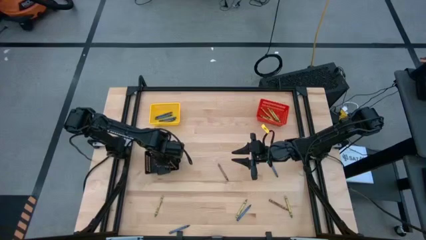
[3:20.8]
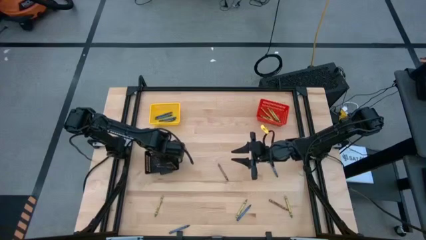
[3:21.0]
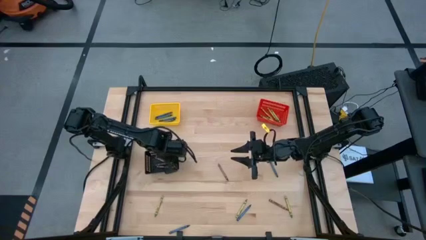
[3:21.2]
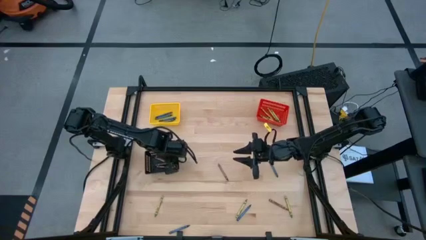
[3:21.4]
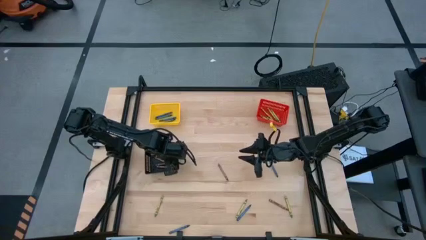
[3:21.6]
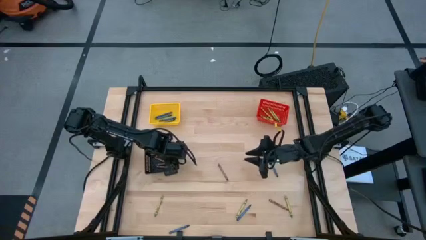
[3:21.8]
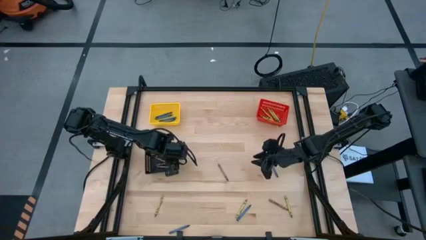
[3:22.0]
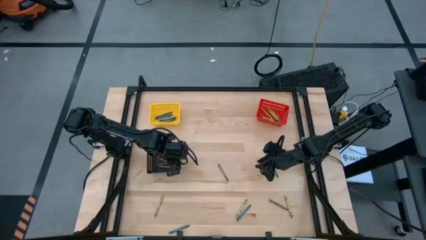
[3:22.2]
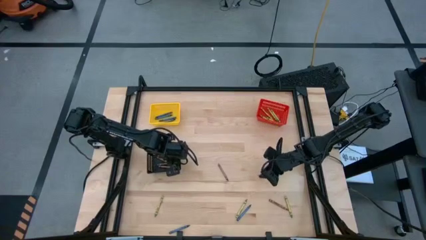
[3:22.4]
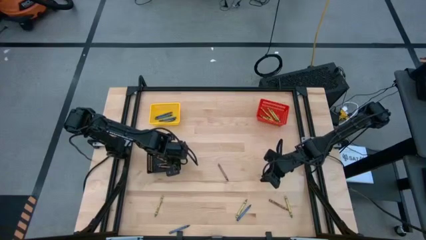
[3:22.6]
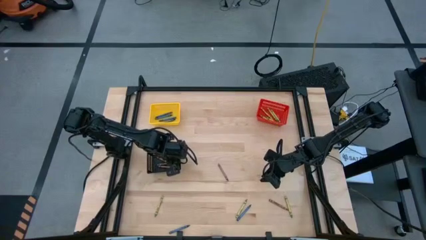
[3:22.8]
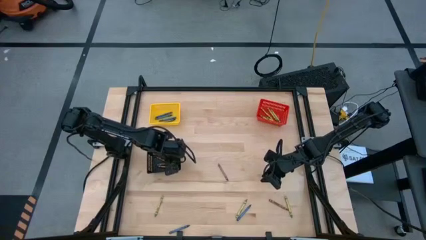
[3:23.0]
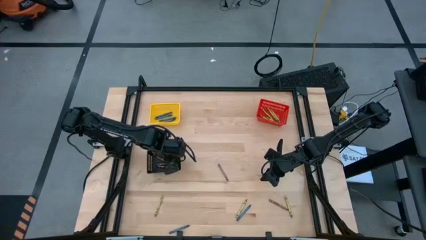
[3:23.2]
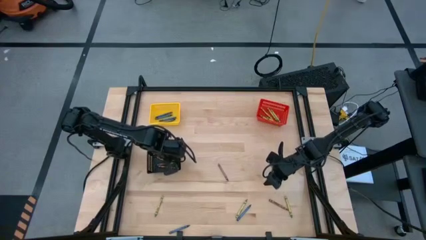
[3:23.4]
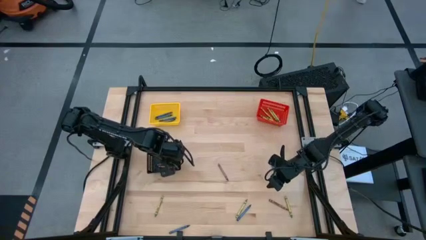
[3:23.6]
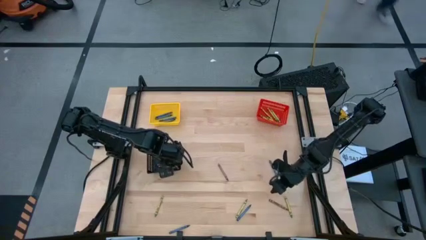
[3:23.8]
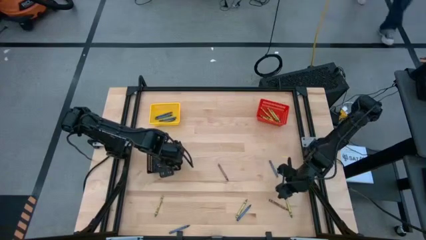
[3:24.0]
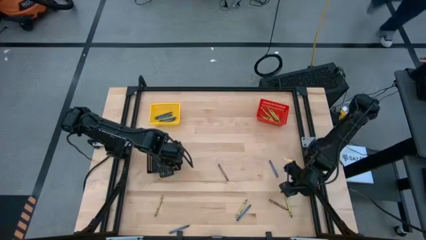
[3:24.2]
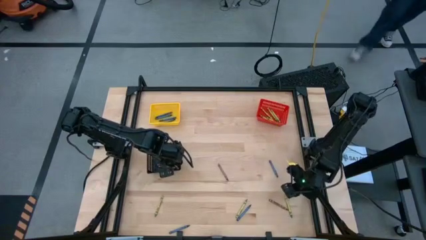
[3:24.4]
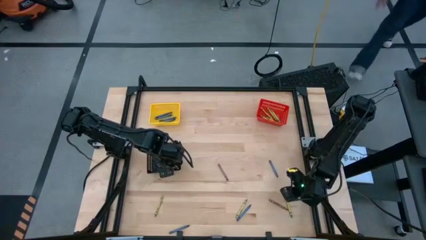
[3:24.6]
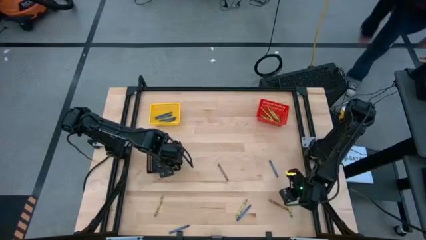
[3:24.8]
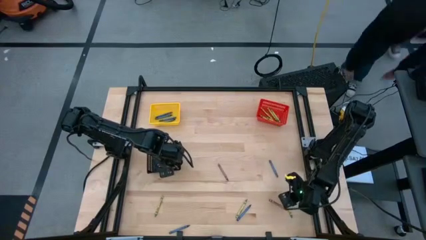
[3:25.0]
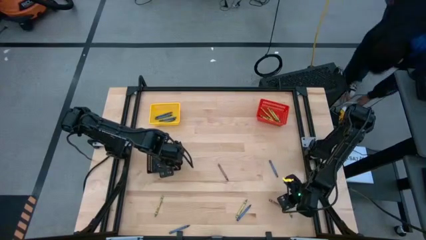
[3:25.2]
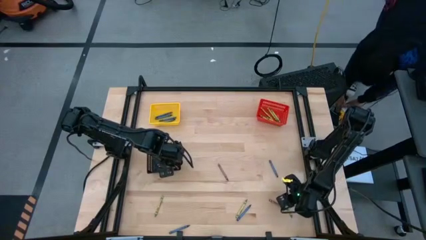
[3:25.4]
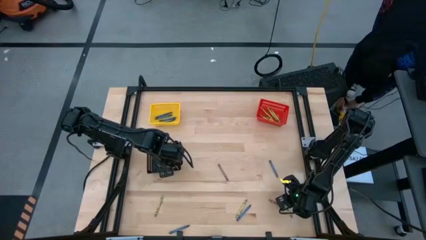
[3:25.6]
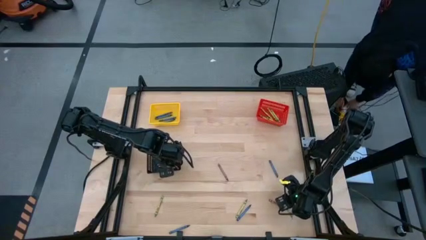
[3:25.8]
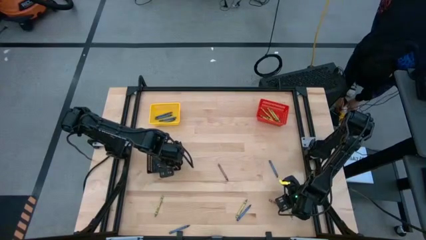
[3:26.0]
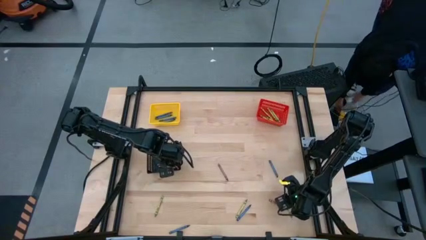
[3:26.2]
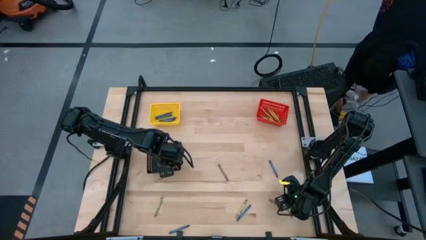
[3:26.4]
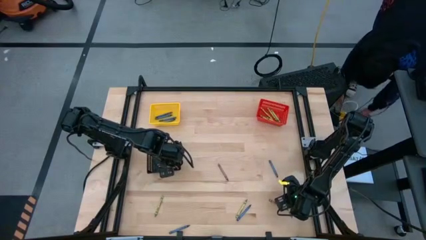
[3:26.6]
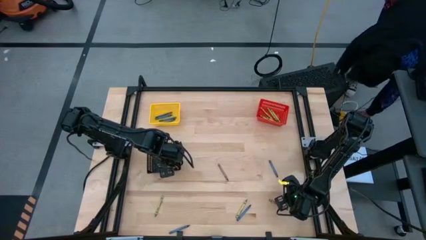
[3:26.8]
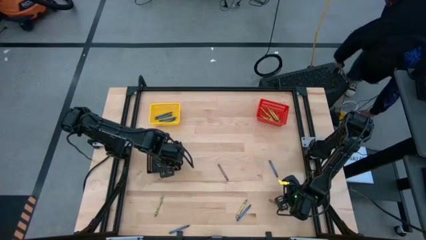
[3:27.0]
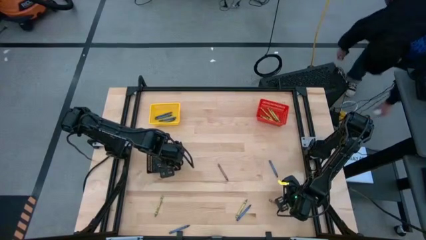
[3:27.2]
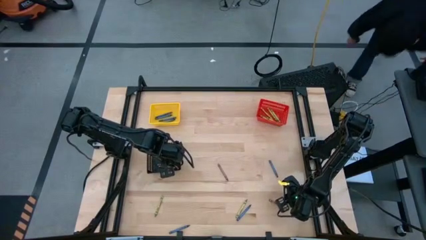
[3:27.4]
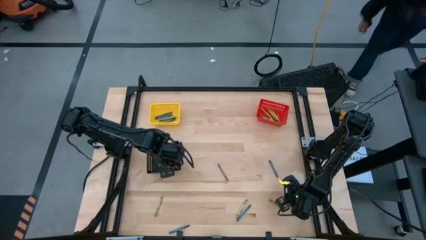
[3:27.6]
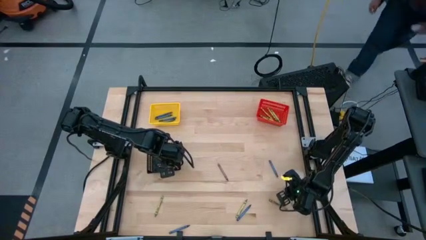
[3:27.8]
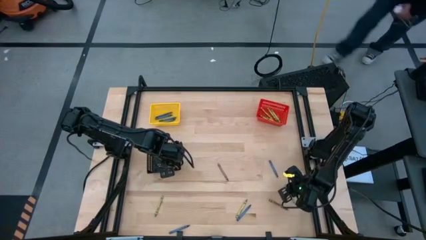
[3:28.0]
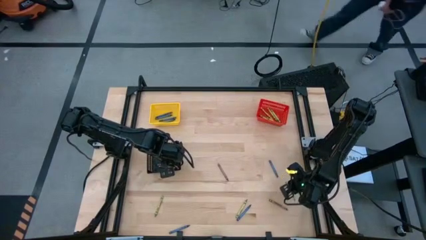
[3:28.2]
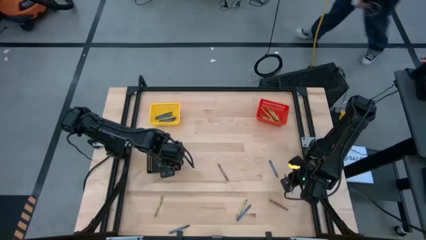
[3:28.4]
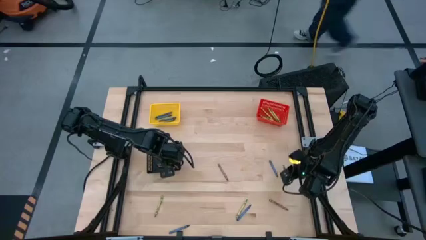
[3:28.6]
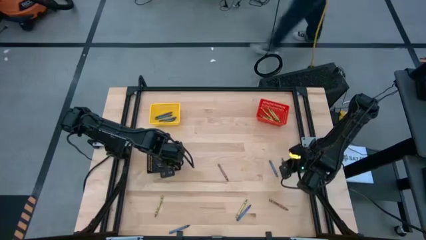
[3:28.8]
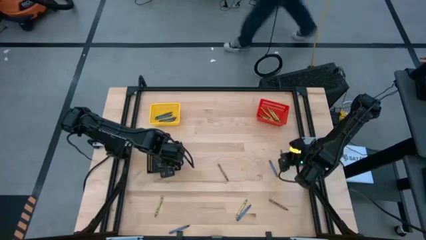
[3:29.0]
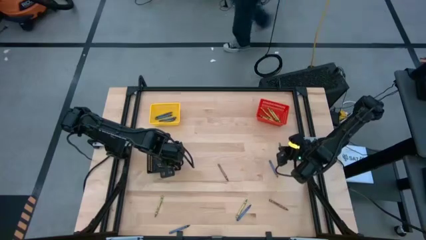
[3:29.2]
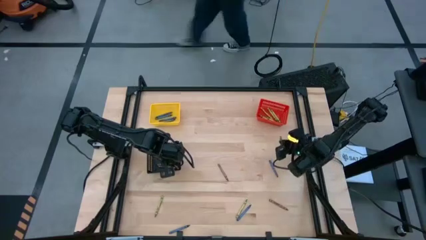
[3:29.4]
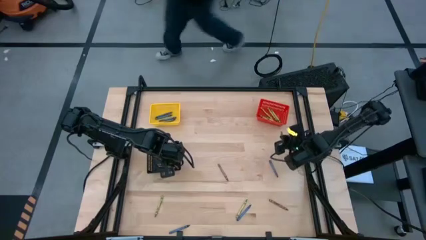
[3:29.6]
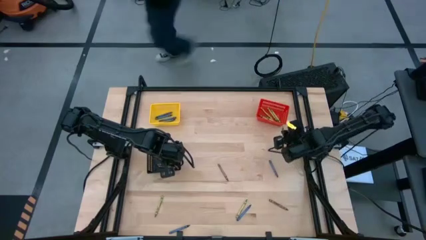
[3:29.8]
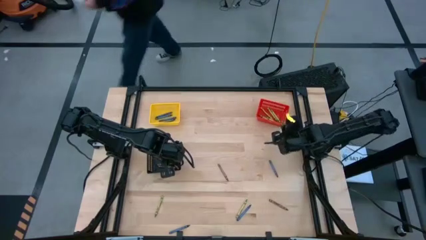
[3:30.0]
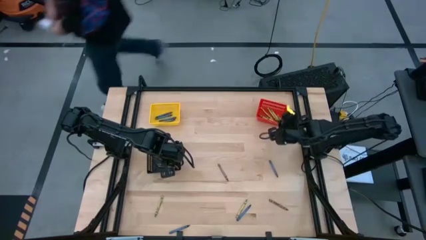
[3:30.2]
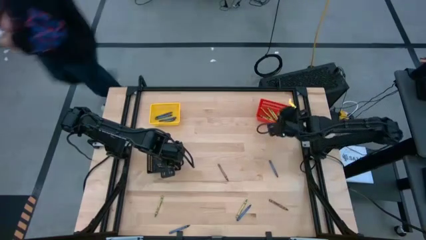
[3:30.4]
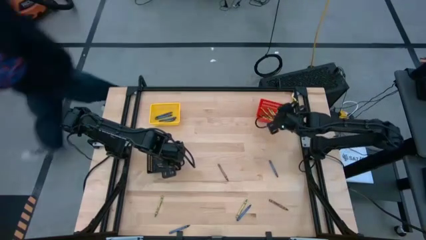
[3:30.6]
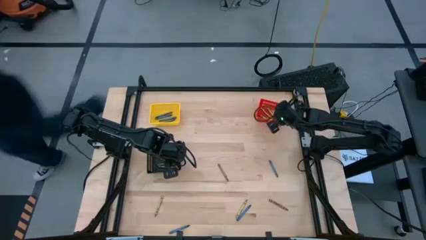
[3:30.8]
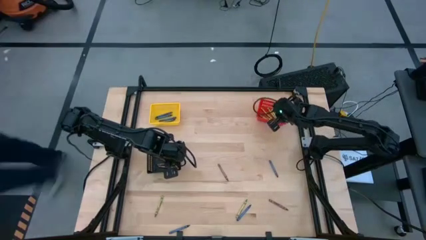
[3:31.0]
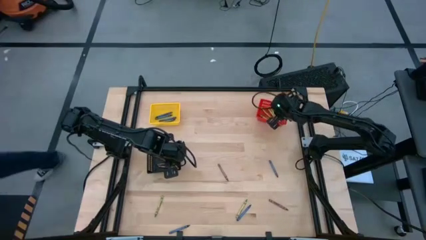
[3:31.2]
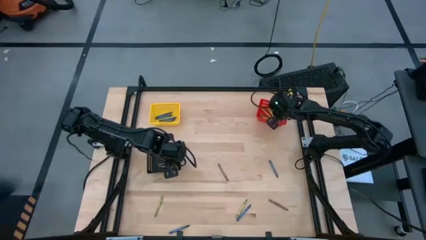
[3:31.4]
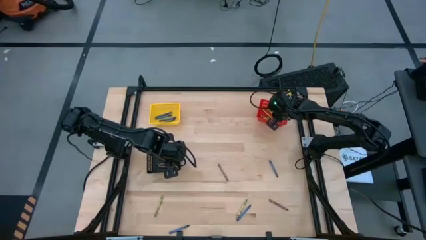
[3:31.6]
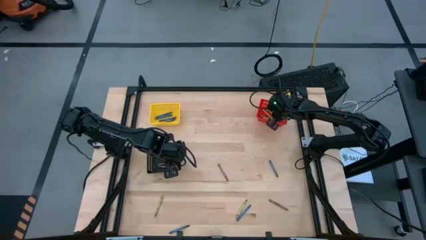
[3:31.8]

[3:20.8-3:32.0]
Task: Sort crayons
Put the green crayon into the red bin

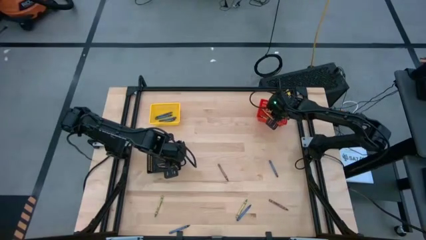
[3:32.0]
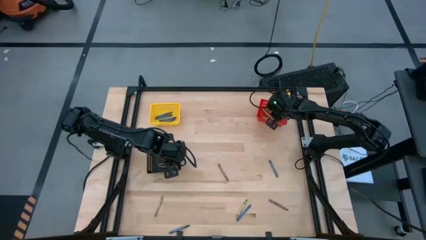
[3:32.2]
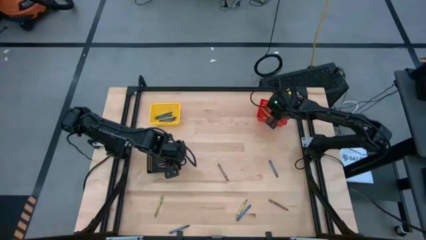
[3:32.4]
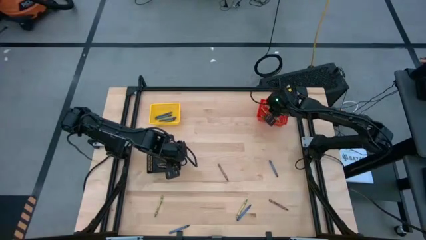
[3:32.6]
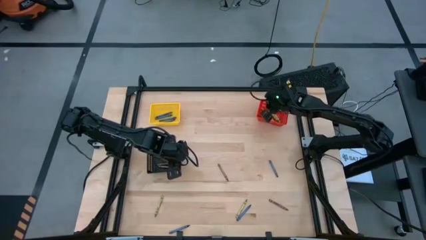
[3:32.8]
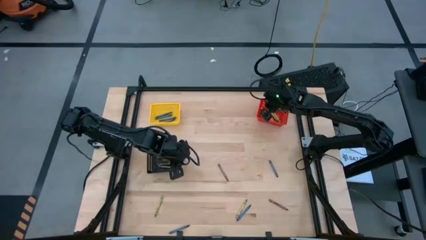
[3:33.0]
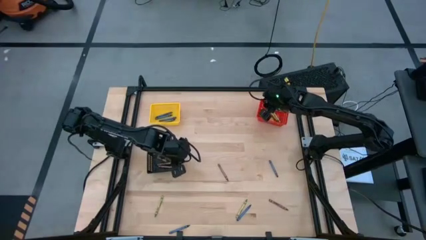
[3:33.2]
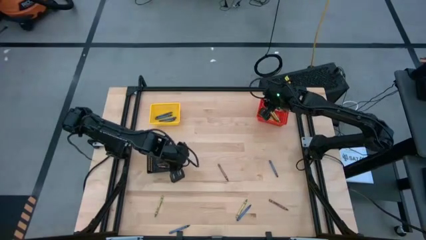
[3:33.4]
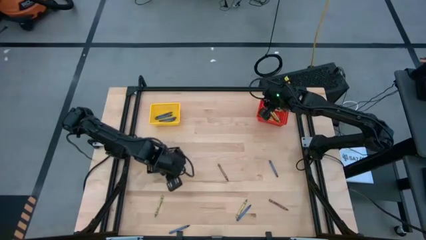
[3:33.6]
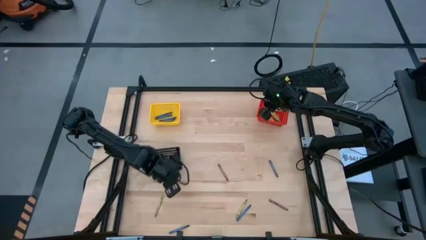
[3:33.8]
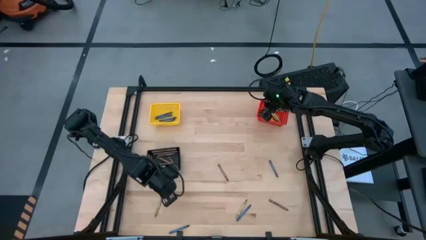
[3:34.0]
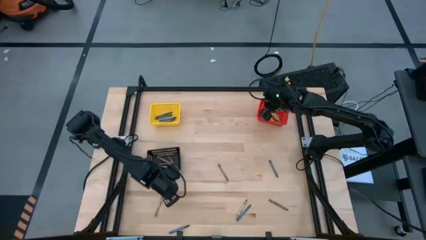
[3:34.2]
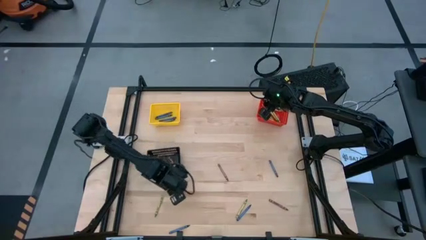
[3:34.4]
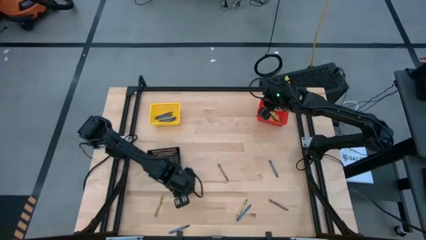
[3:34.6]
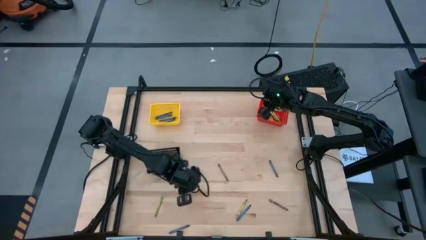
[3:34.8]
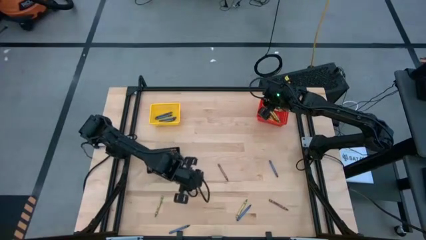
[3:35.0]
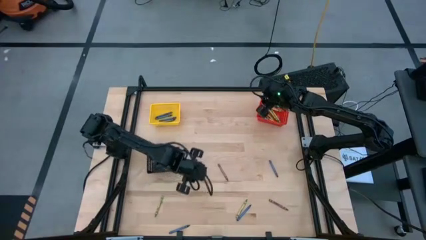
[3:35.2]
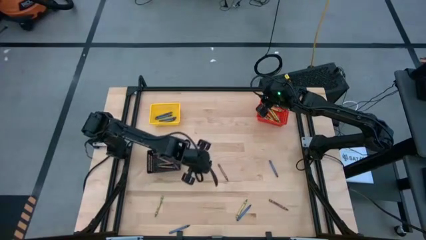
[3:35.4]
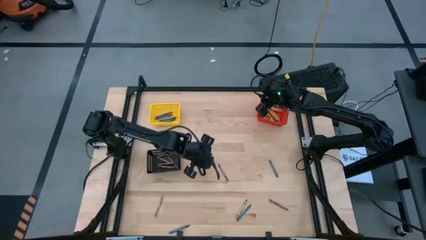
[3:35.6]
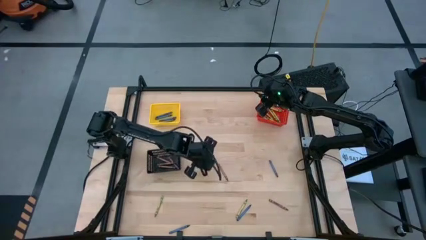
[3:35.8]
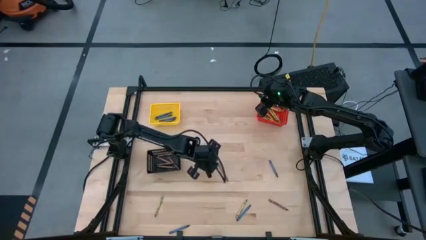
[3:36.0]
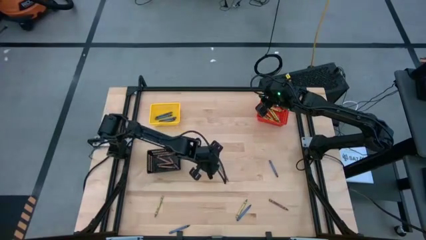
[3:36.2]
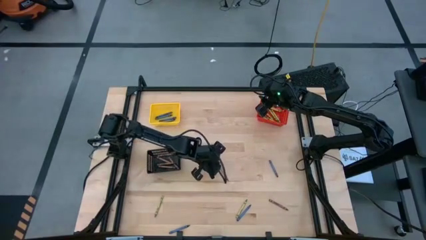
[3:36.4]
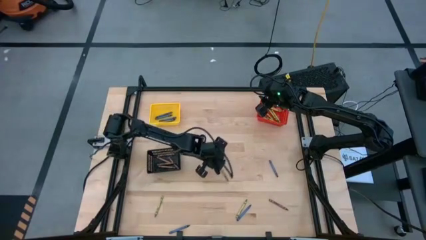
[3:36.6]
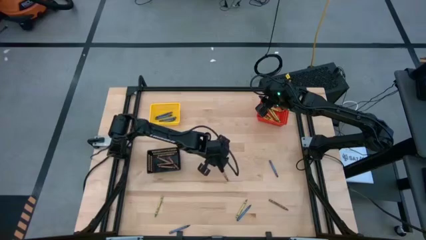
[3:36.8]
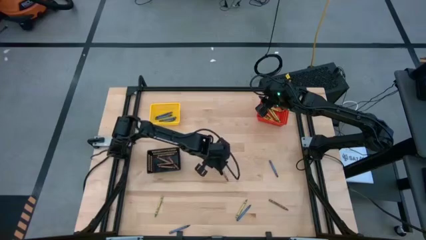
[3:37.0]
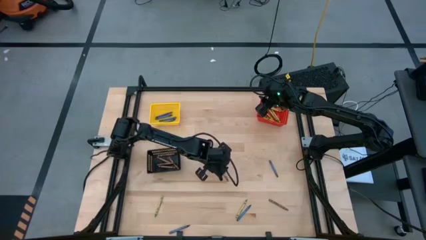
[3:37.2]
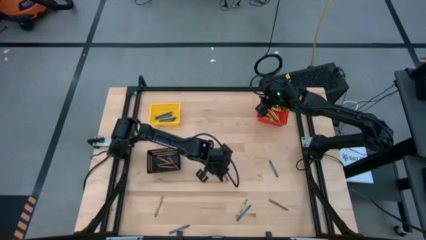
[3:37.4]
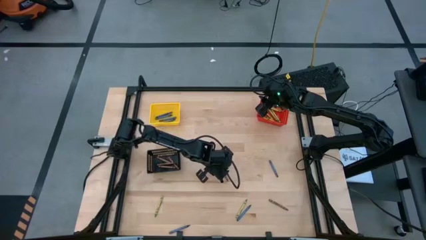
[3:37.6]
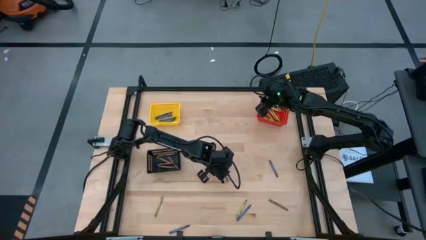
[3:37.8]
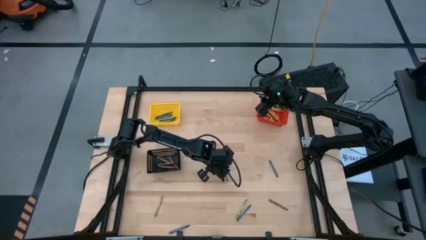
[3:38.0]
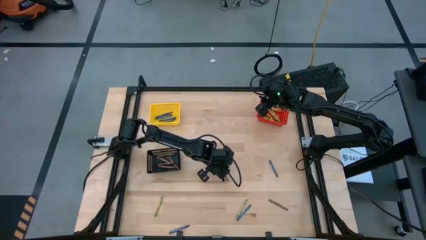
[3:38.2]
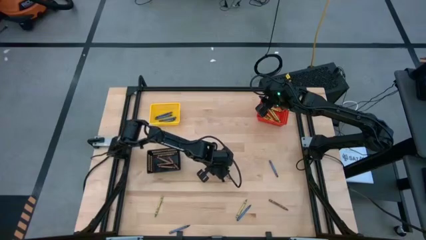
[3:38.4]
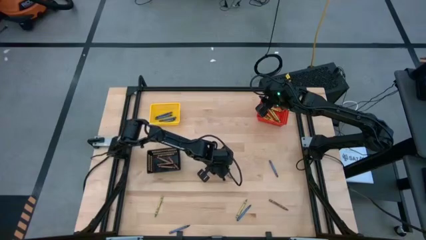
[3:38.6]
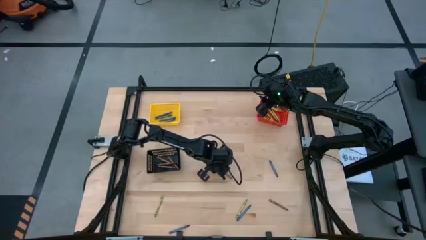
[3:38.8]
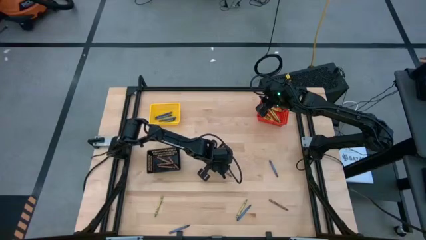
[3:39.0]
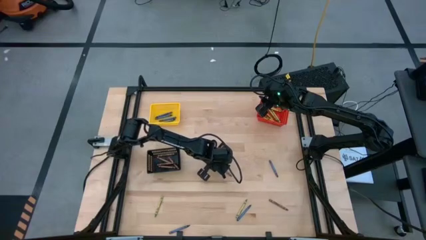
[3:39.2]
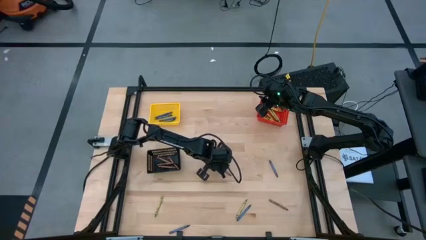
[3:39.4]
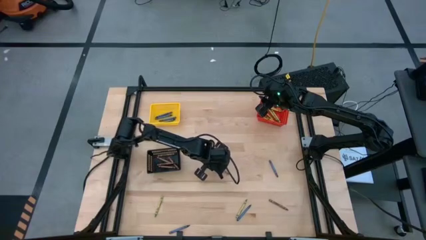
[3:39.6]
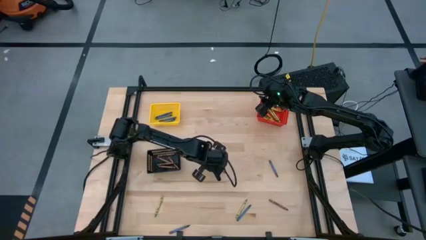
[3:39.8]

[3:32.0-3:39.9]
Put the brown crayon into the black bin
